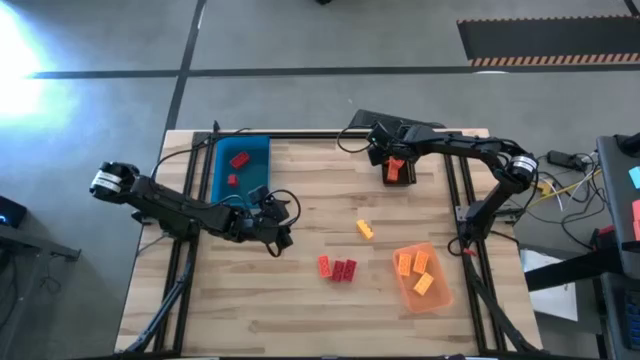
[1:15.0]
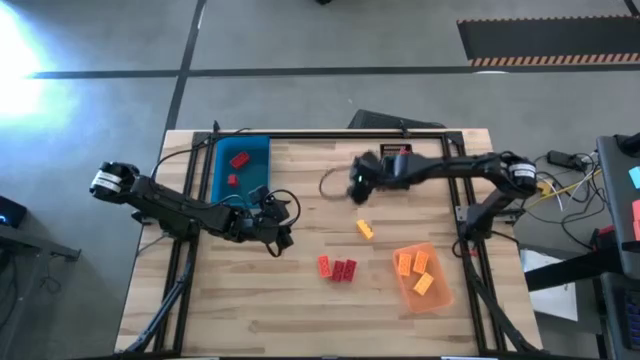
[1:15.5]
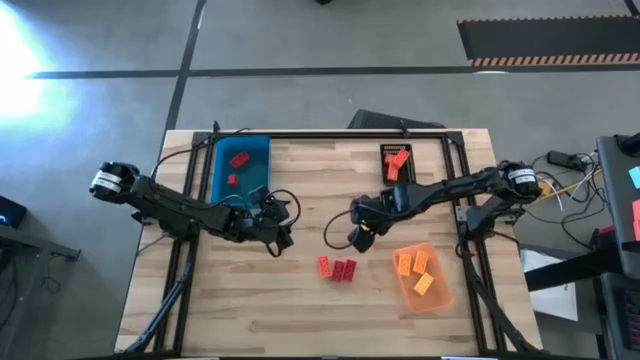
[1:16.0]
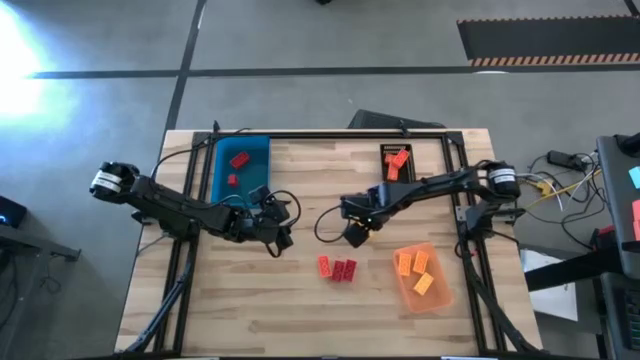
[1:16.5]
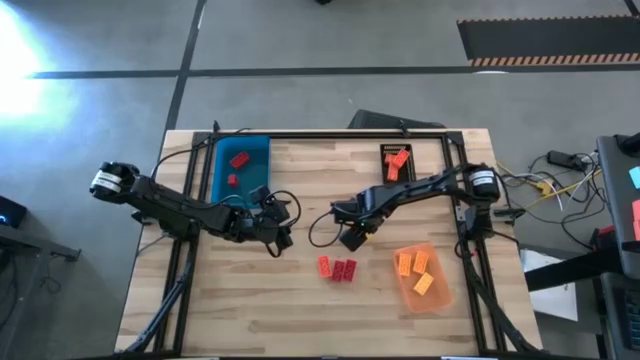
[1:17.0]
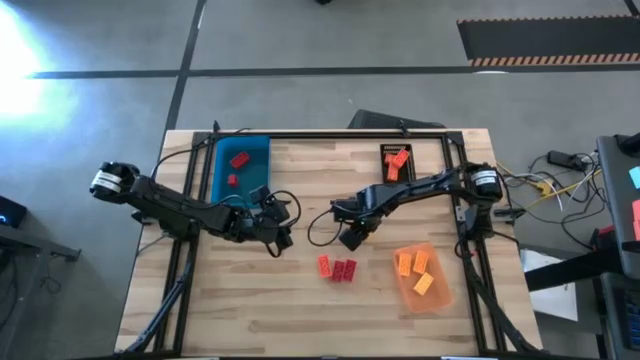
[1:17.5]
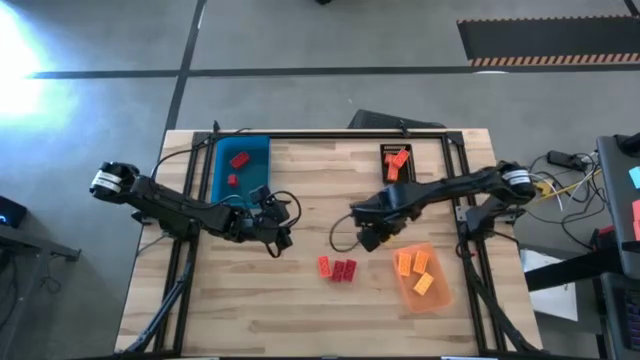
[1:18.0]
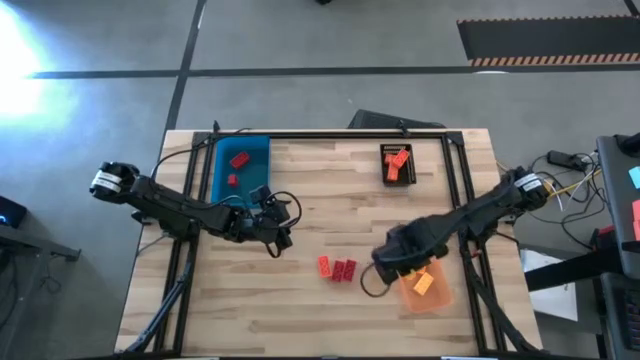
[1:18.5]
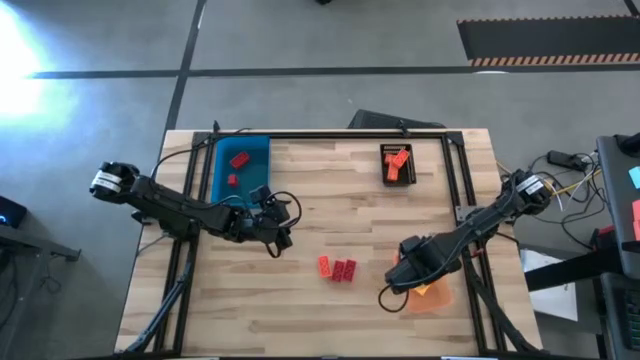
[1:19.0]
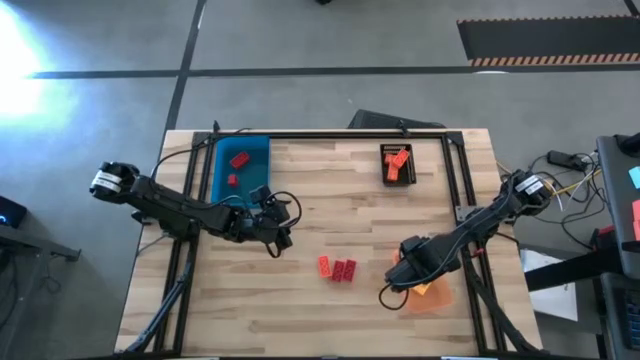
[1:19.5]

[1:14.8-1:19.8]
Task: Sort & place blocks by color
Put the yellow game piece into the orange bin

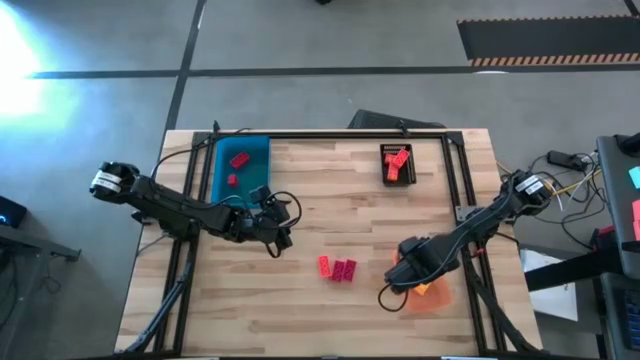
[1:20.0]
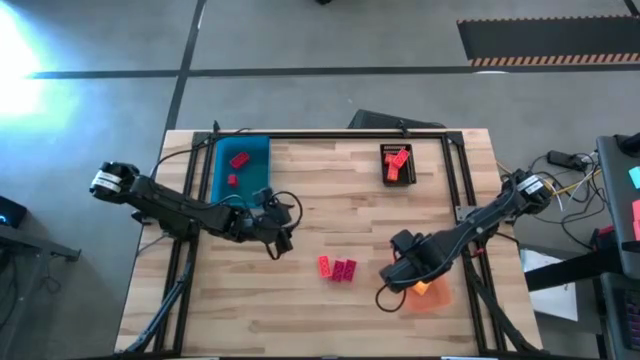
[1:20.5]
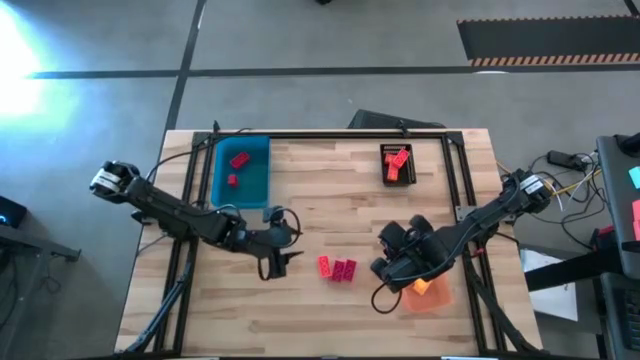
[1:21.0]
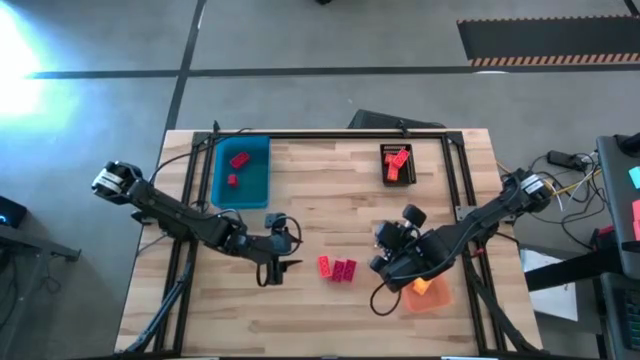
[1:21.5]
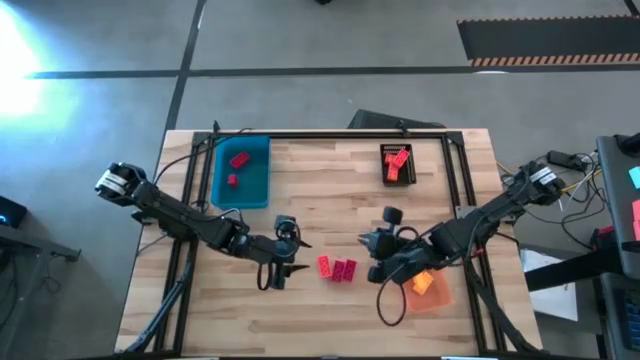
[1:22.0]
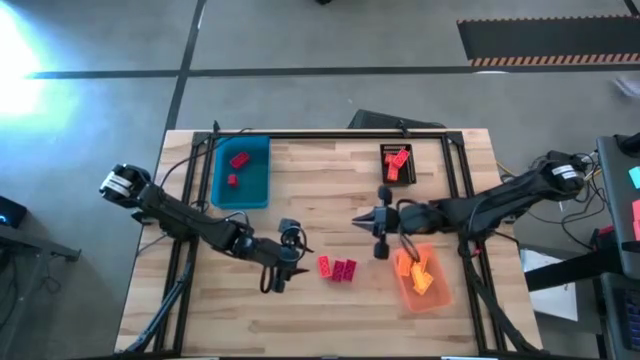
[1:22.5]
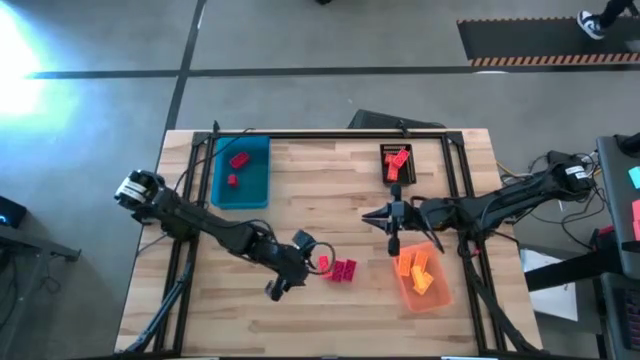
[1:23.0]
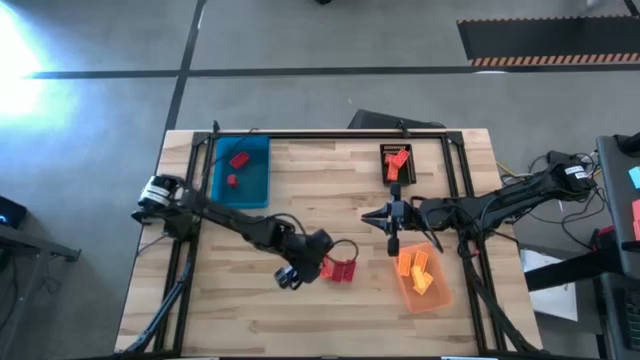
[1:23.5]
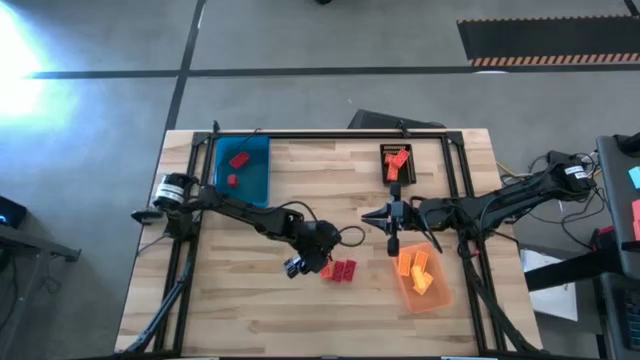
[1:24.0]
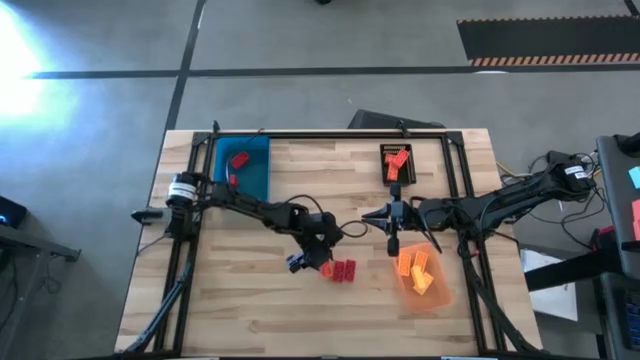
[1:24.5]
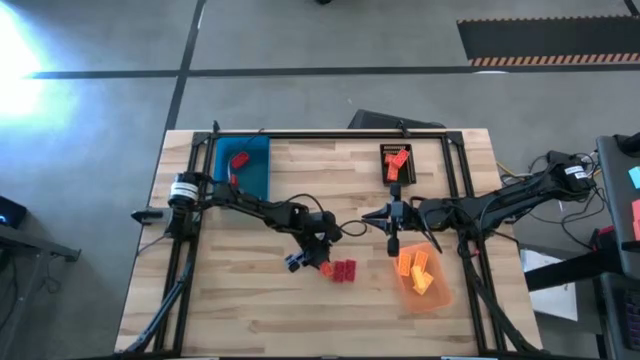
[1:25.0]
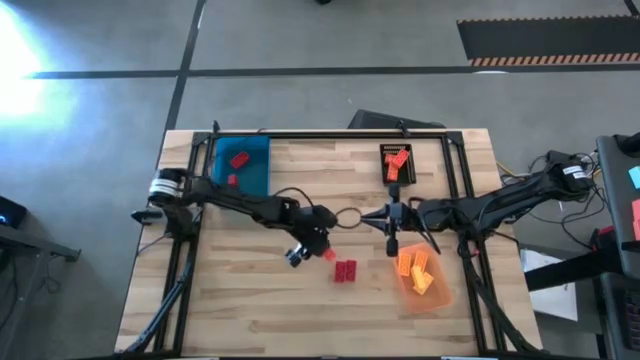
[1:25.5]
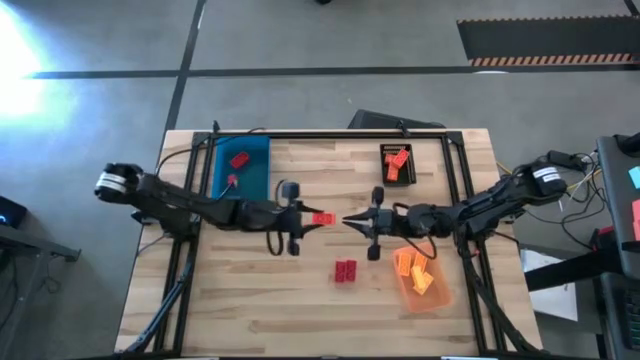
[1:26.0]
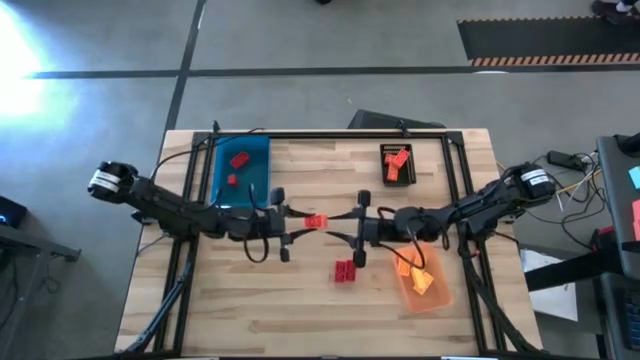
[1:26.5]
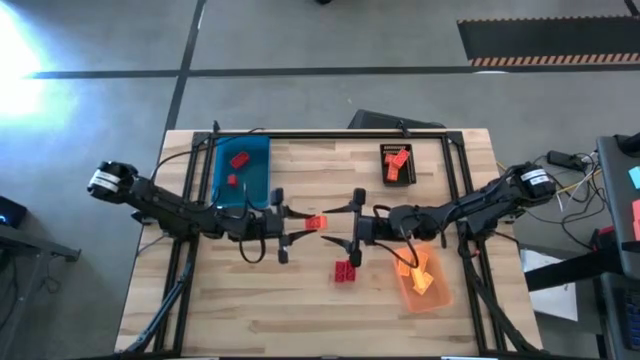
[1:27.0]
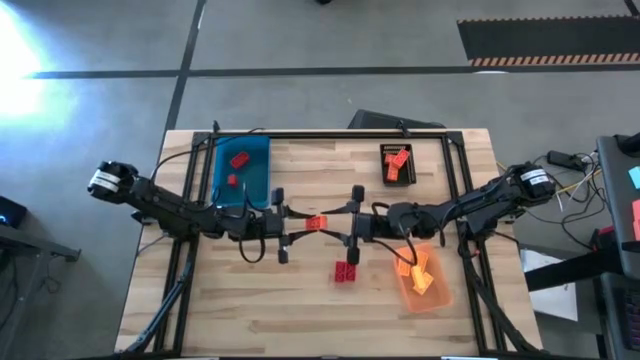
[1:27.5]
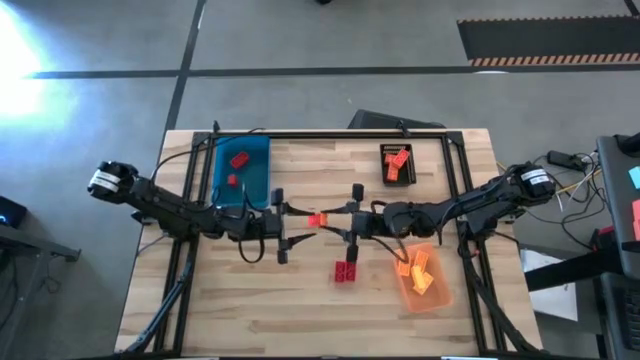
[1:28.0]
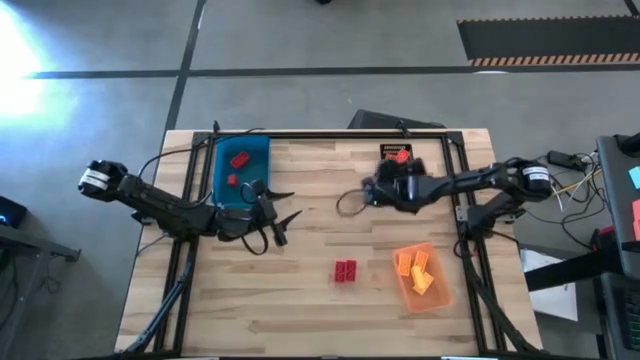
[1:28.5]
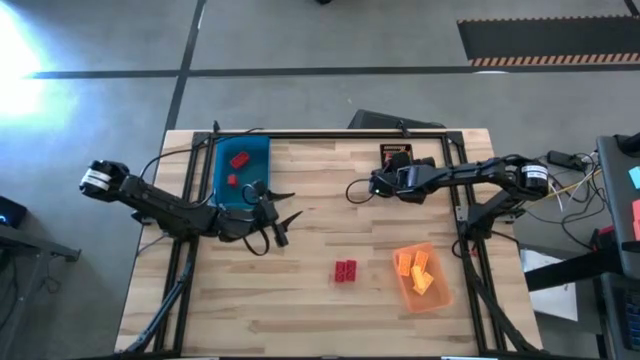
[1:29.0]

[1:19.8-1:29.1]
Put the orange game piece into the black bin

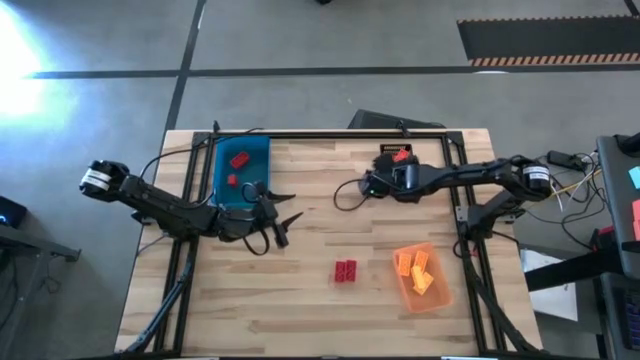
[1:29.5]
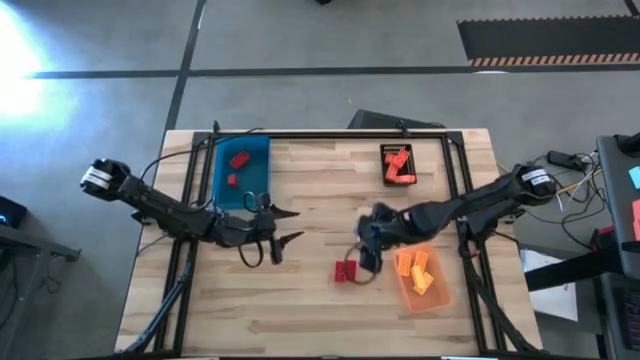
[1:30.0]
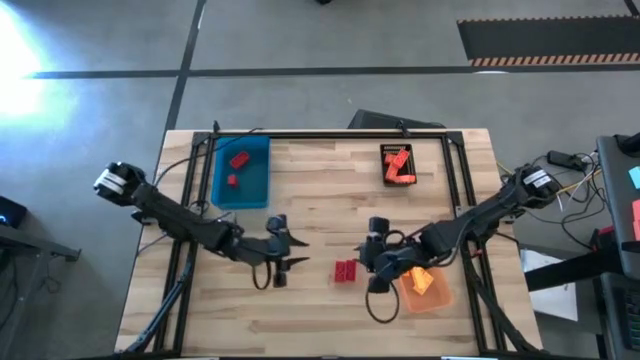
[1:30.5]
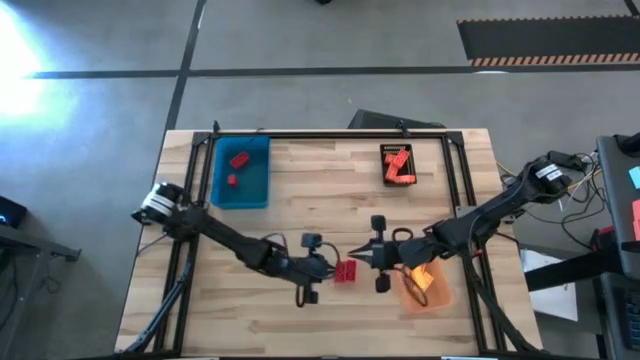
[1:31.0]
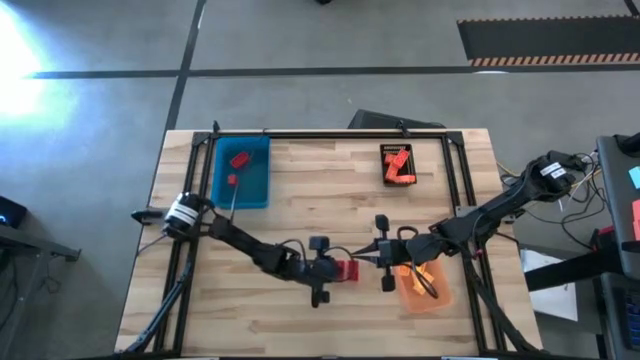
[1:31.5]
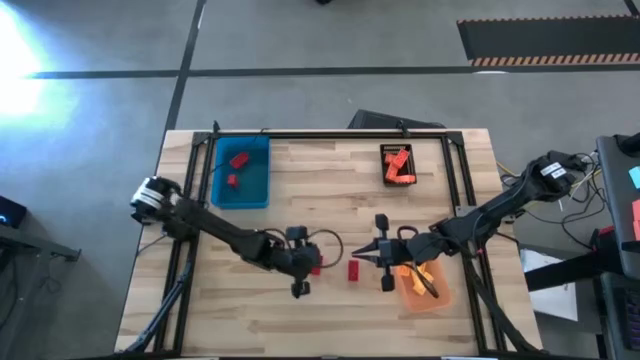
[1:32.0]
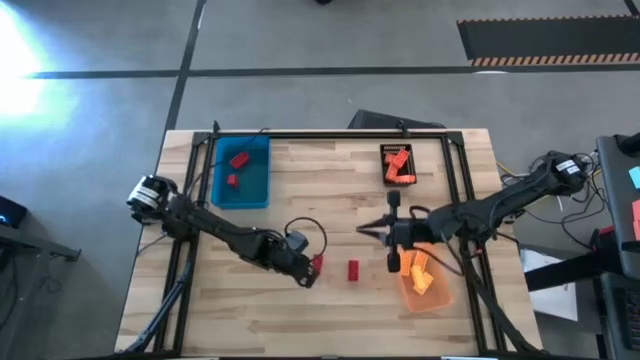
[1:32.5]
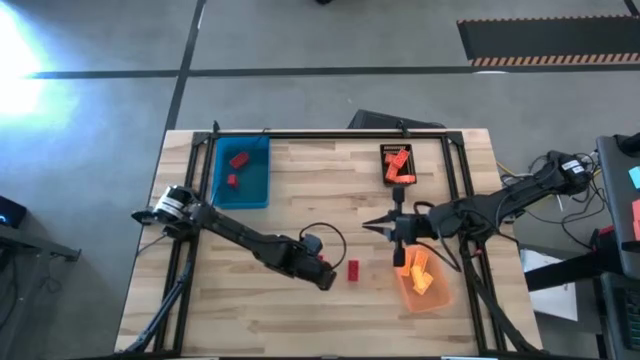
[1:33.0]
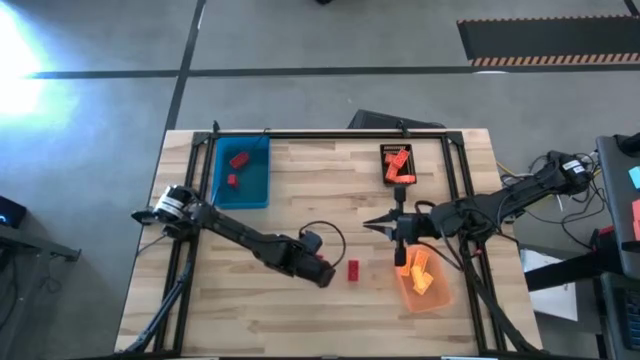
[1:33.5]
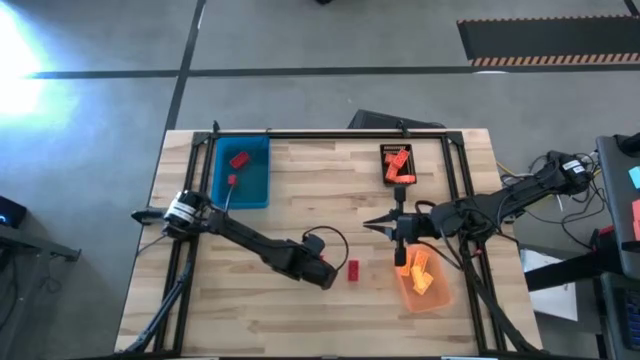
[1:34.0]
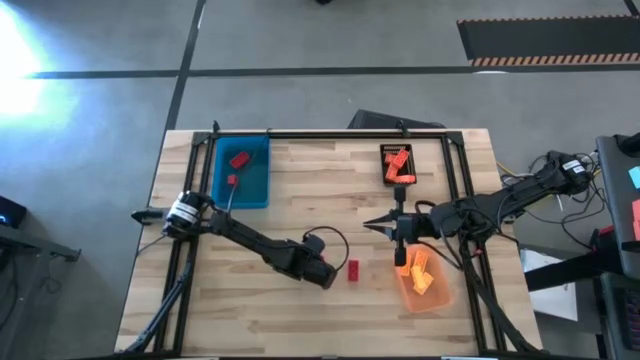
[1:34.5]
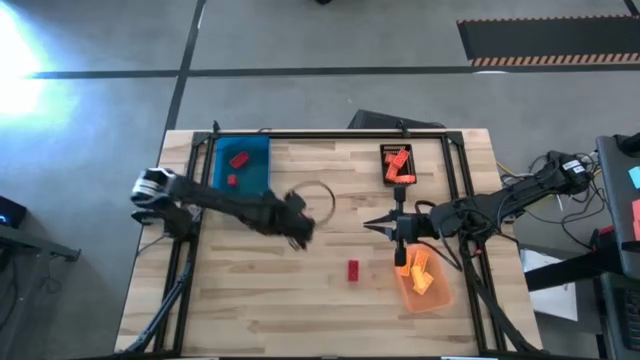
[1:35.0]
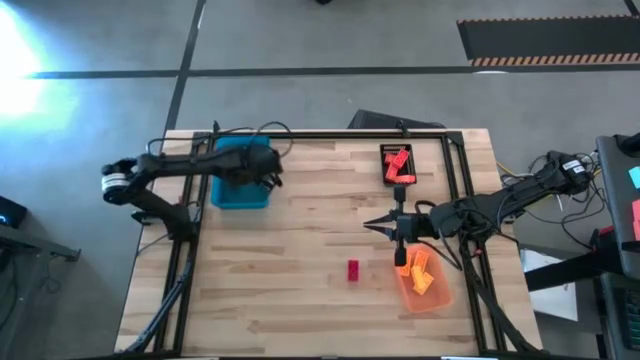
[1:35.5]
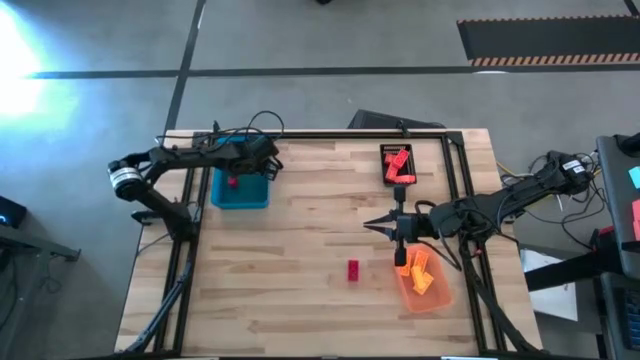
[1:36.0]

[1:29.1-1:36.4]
Put the red game piece into the blue bin

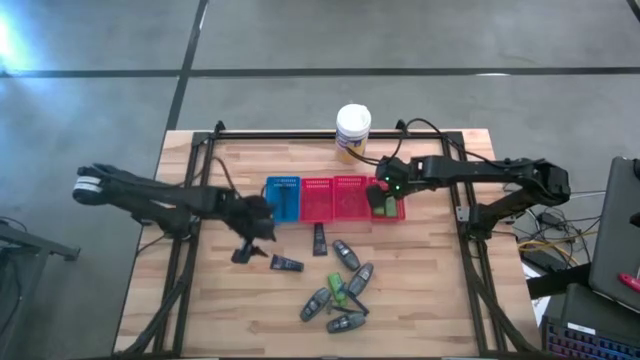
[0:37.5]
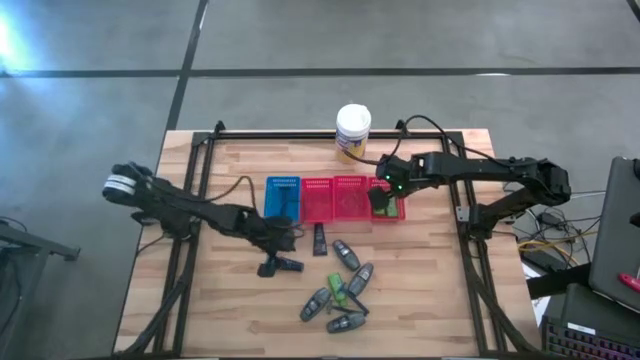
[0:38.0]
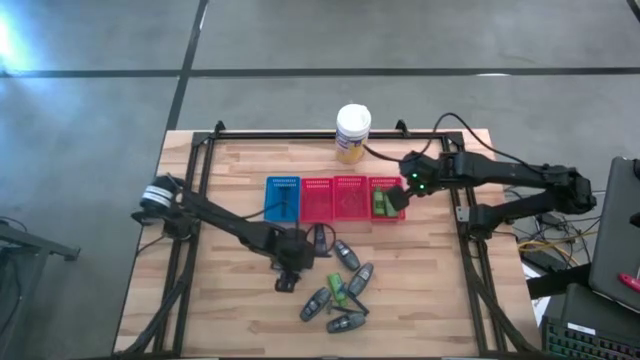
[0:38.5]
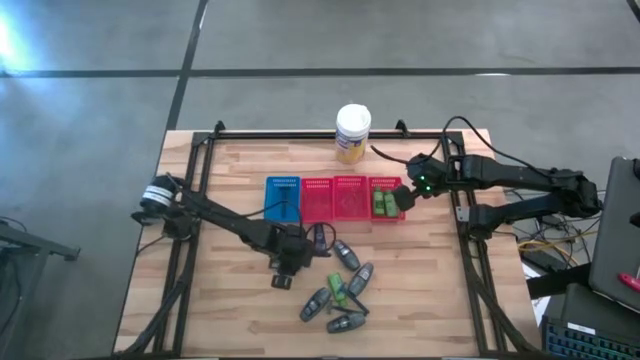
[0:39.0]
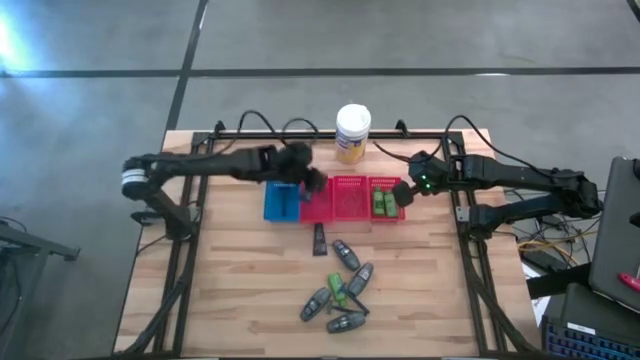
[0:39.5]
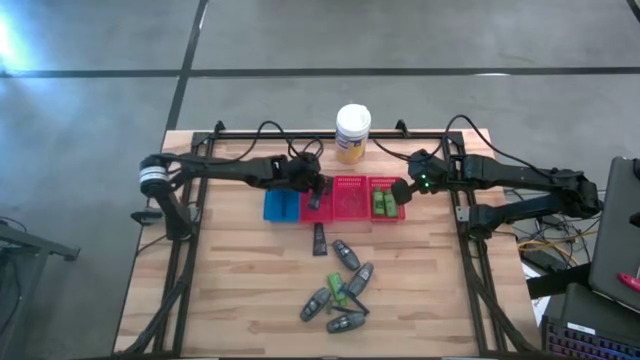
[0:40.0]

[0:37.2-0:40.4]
Task: Pick & Place Travel size toiletries
Put the blue shave cream into the left red bin
